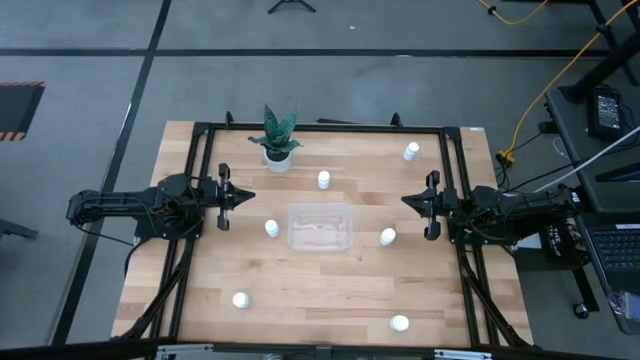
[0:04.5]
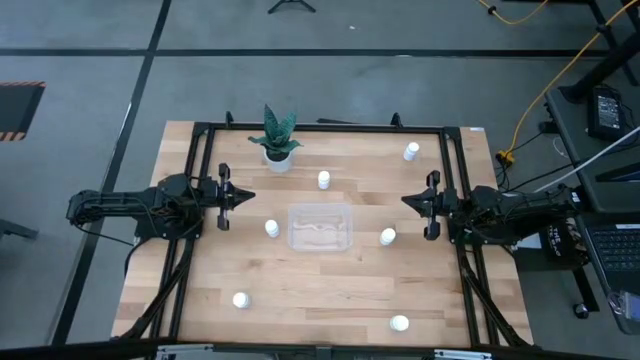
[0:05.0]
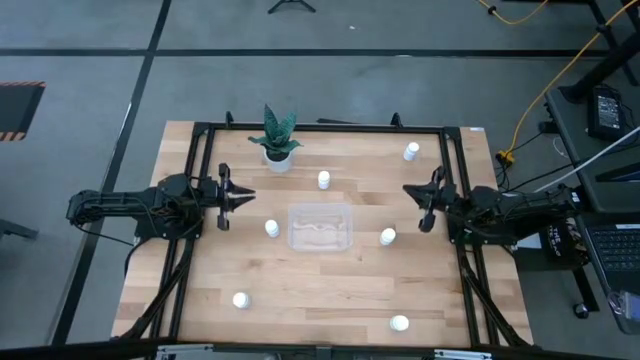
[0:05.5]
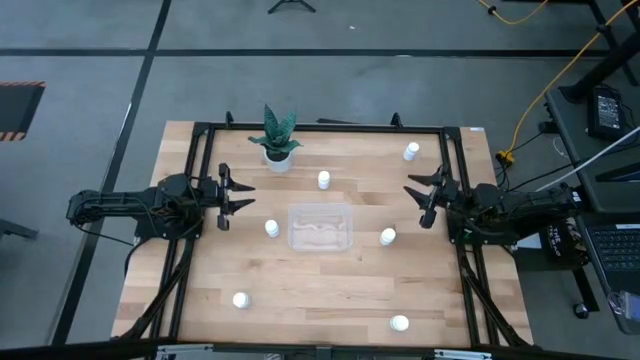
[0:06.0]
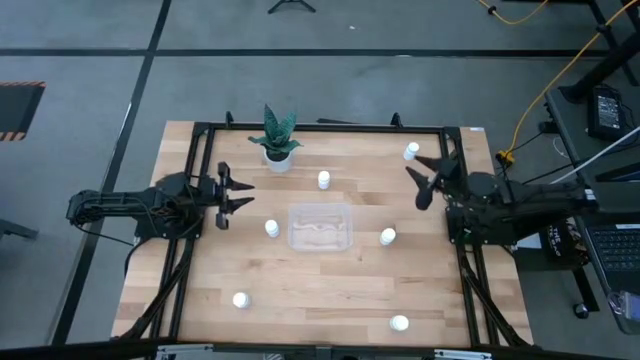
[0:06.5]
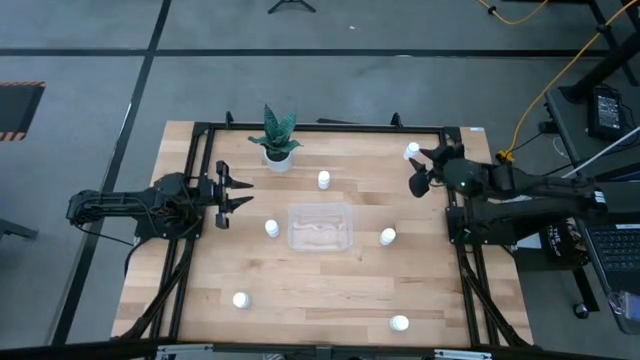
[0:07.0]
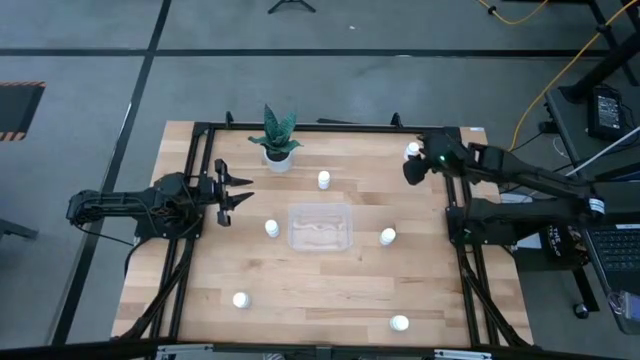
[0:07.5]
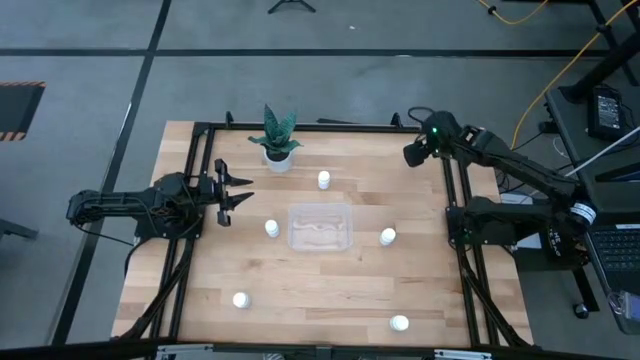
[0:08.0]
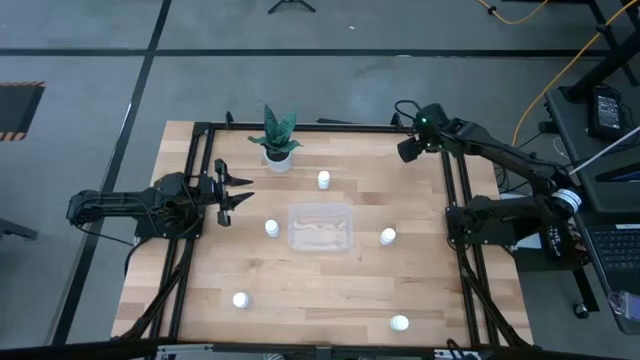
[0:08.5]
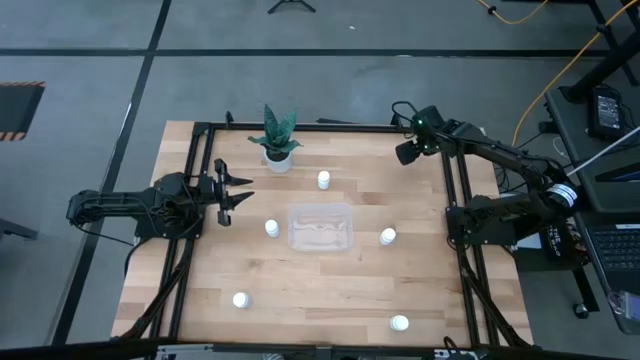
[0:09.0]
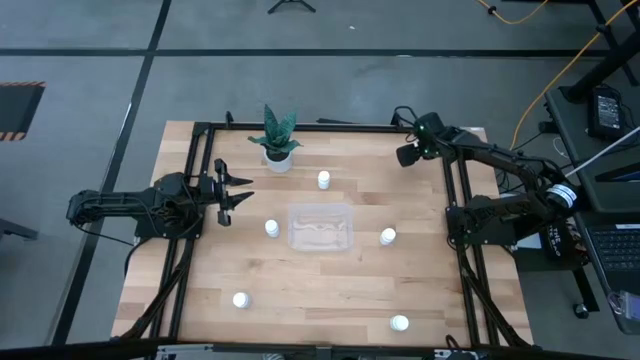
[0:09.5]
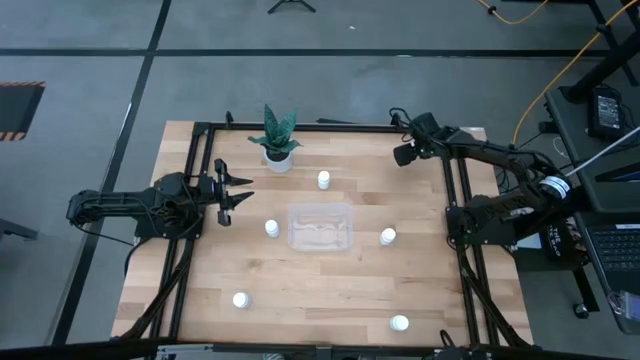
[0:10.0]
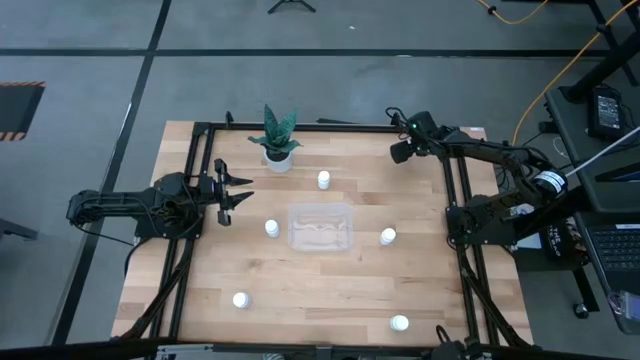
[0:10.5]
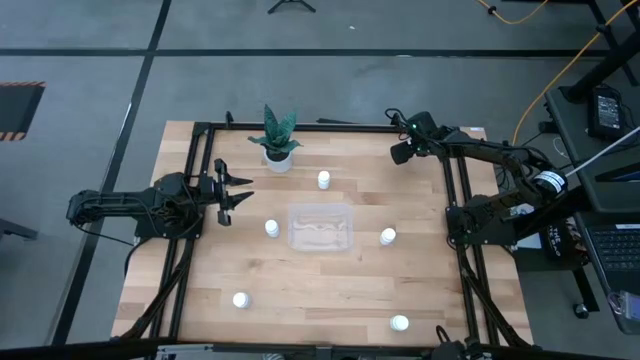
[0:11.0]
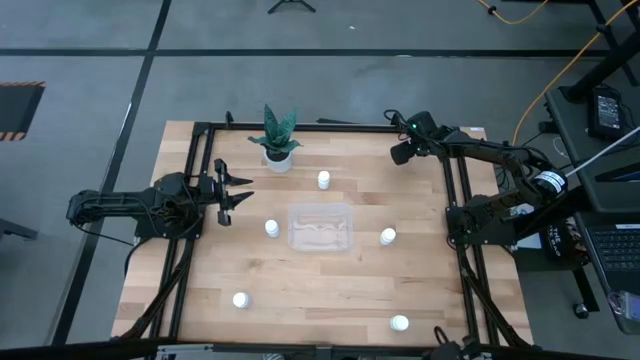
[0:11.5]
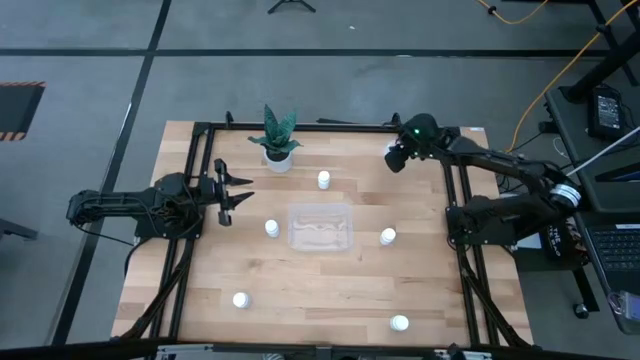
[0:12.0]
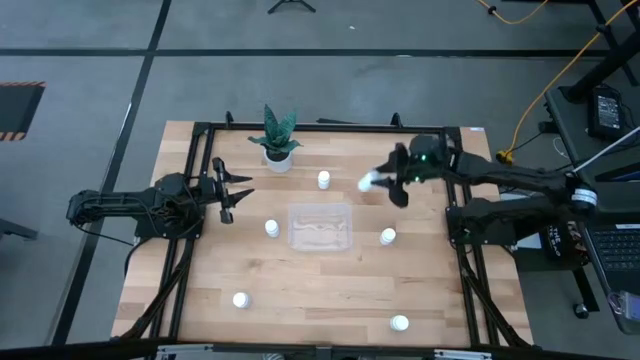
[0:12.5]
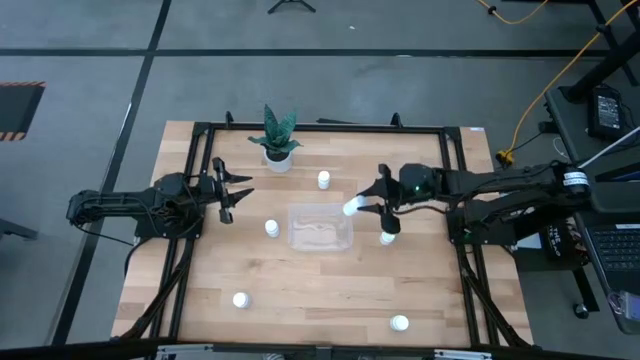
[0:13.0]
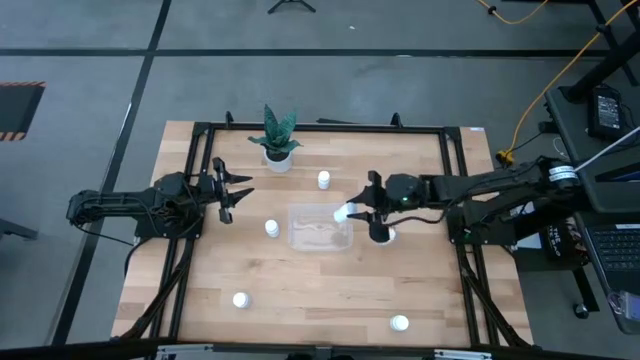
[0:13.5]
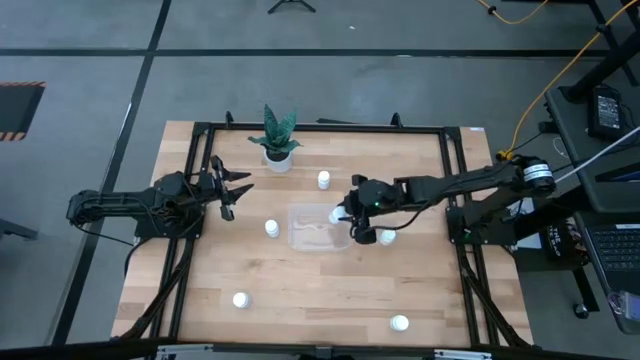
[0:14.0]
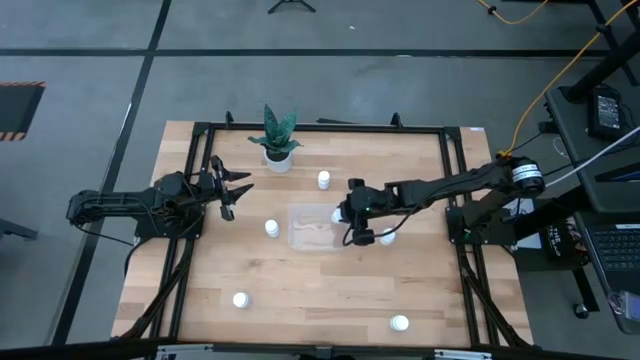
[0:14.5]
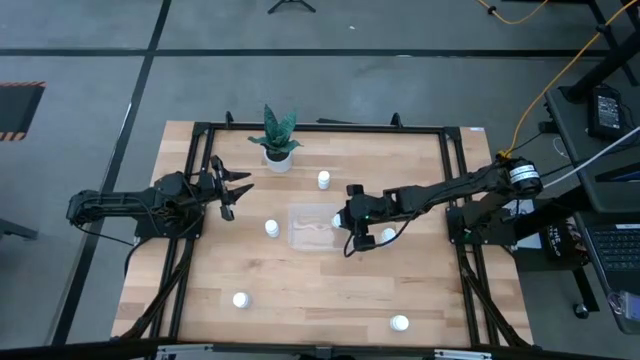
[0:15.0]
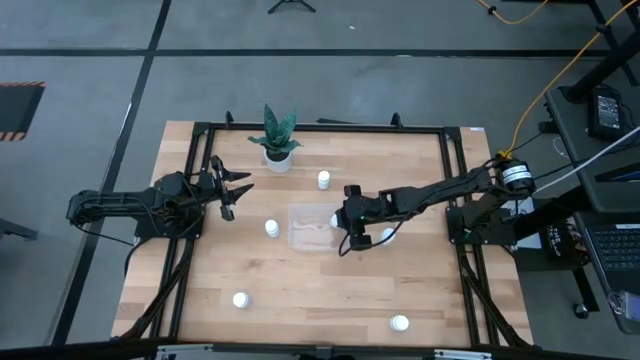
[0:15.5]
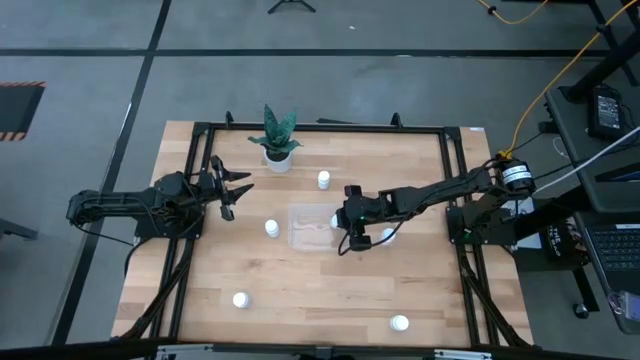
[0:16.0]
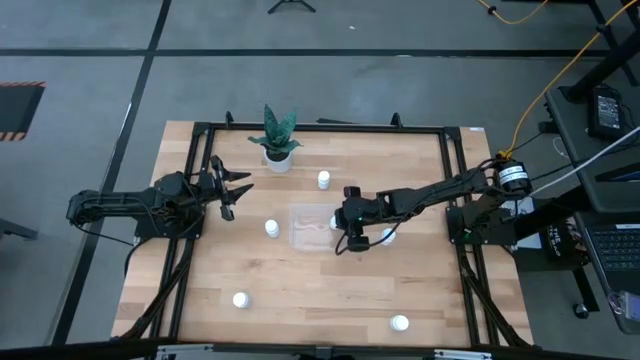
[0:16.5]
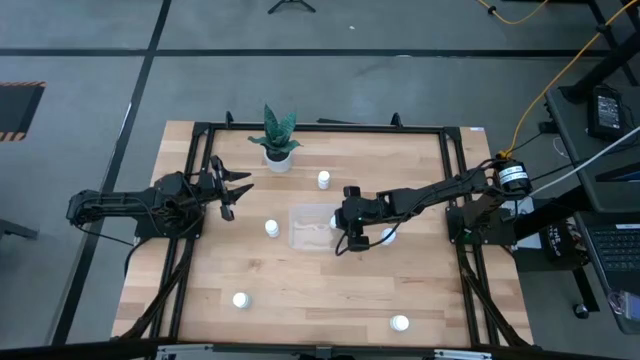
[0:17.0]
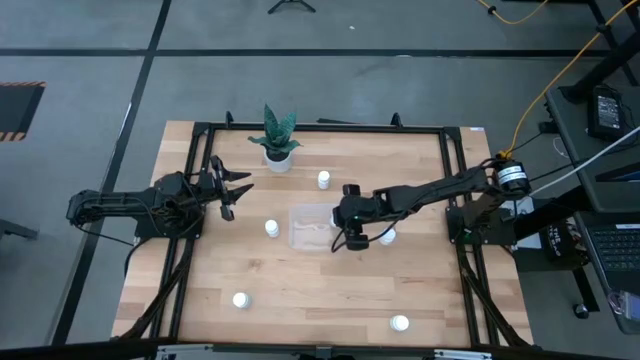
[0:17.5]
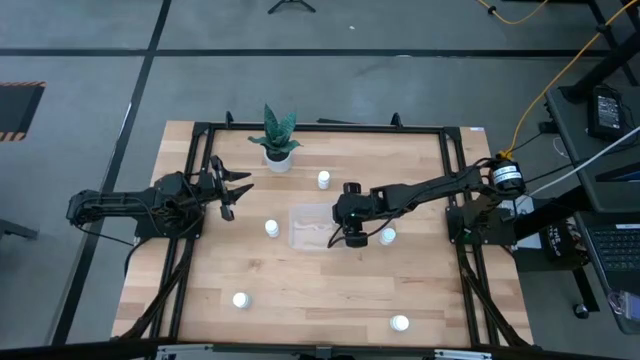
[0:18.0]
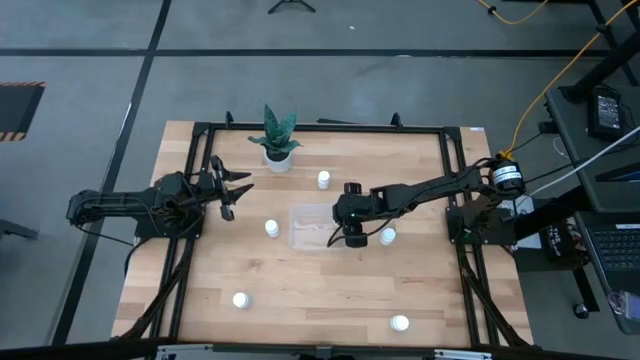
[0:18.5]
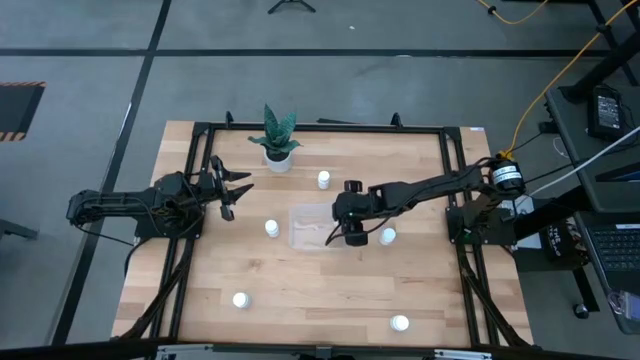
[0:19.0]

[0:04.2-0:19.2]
Task: Pick and place pill bottles into a basket
Put the white medicine bottle into the transparent bin
